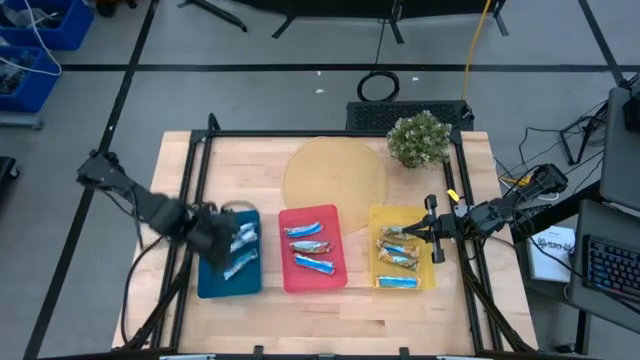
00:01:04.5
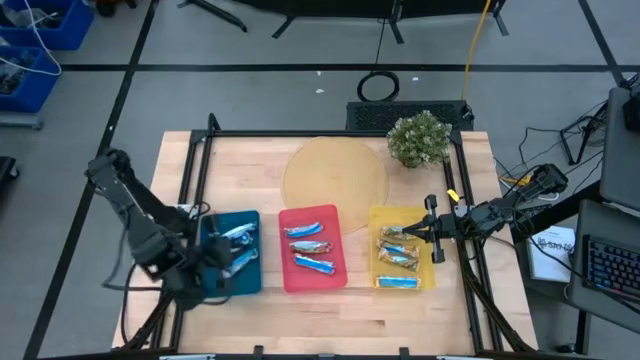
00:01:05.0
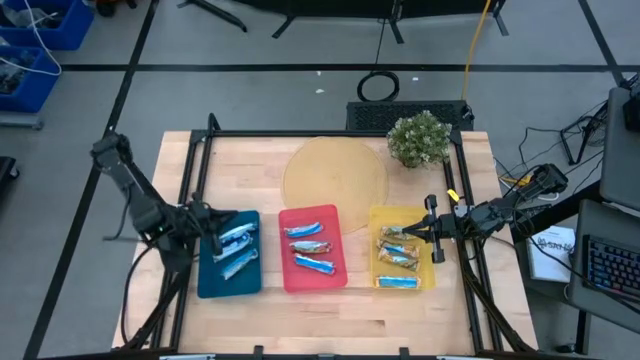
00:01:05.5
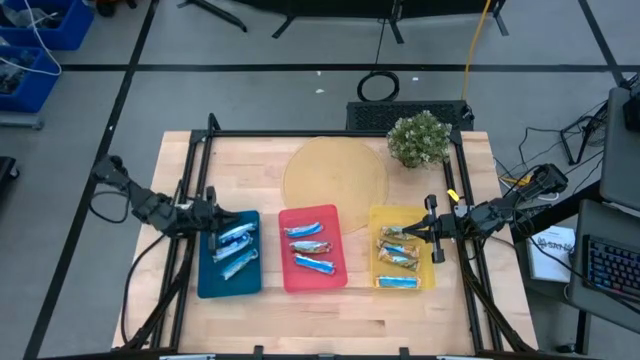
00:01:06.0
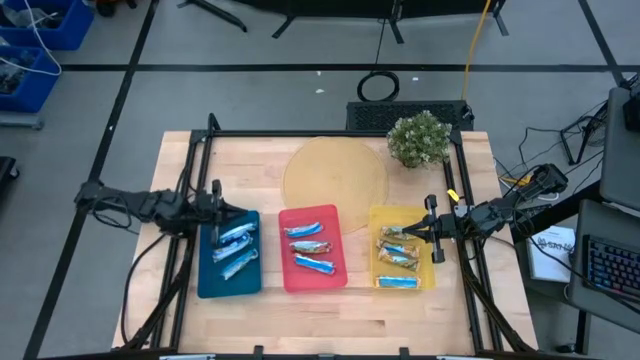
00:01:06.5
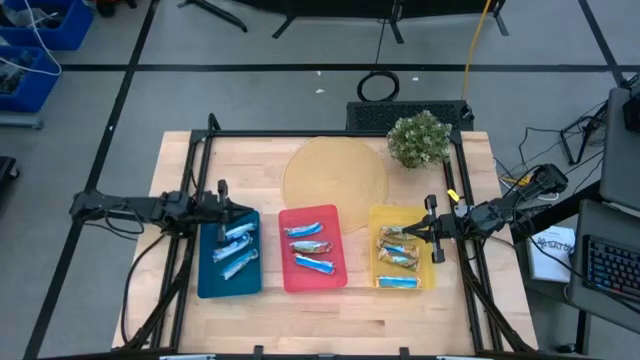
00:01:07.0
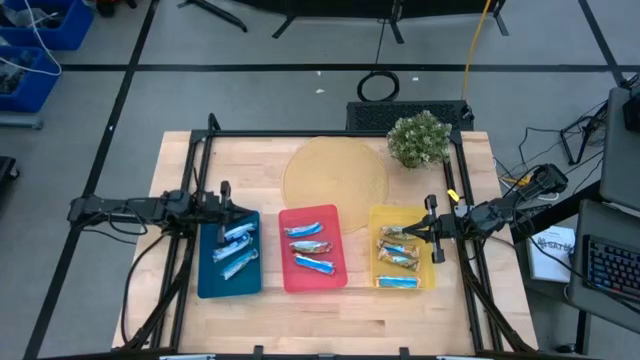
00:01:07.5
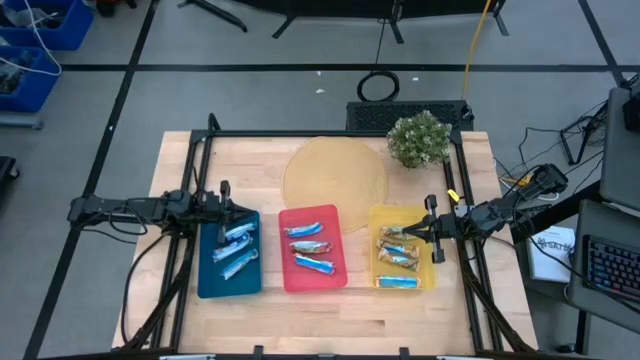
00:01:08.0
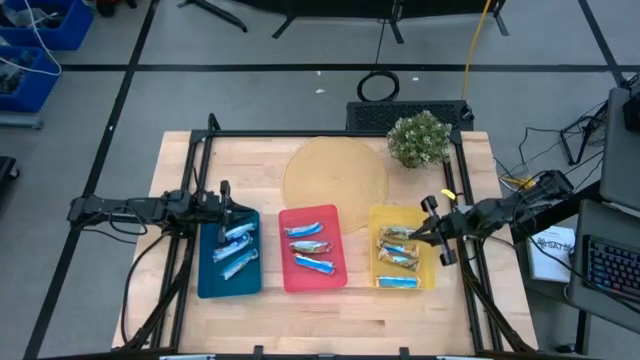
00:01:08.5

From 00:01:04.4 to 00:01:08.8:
Task: Pick and place Granola Bars by type
Return to Home Position

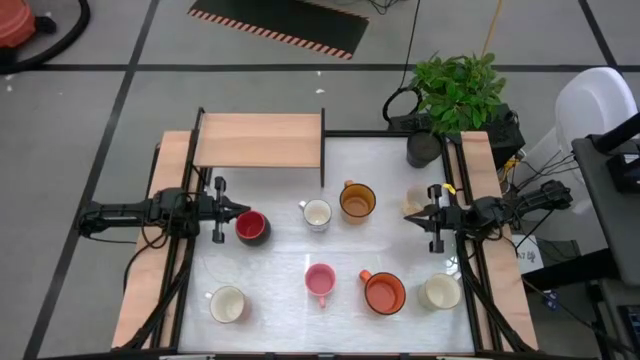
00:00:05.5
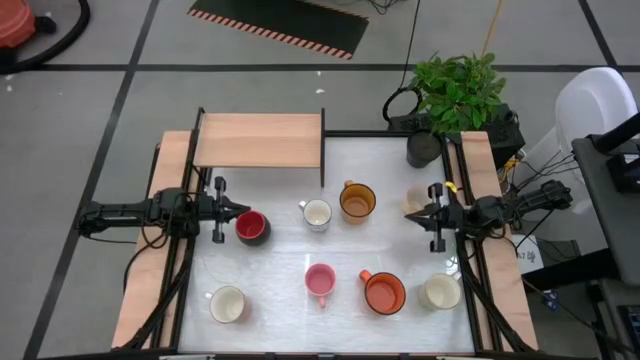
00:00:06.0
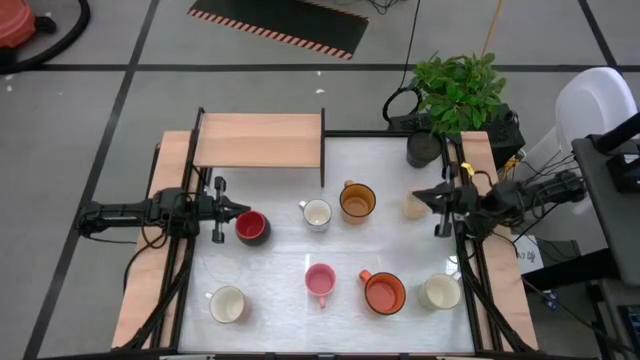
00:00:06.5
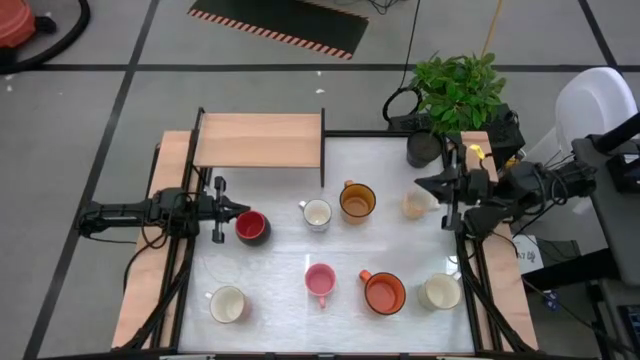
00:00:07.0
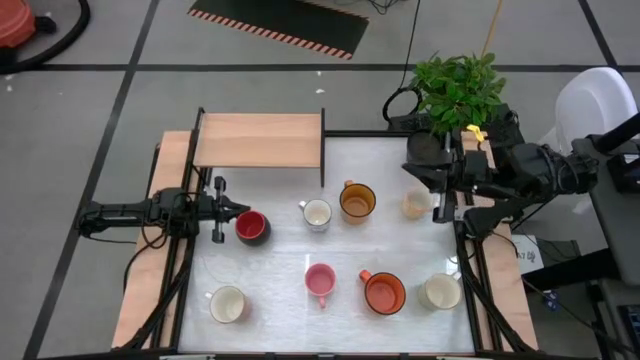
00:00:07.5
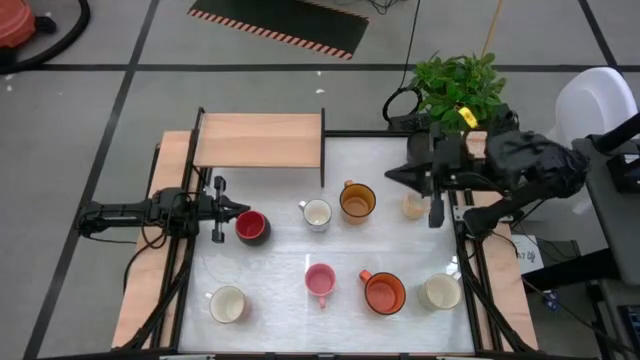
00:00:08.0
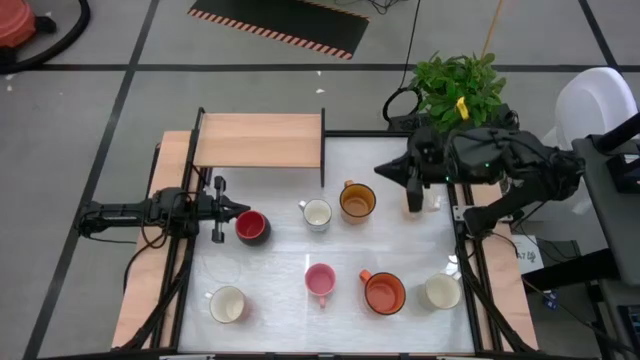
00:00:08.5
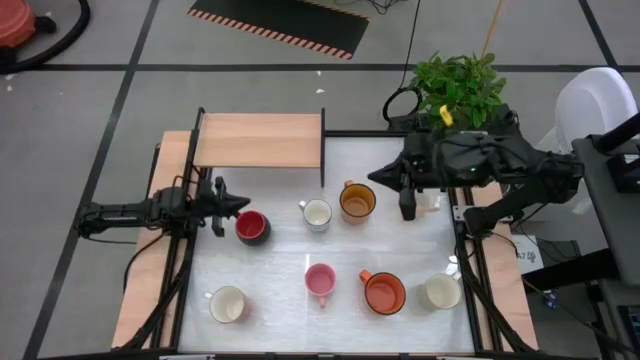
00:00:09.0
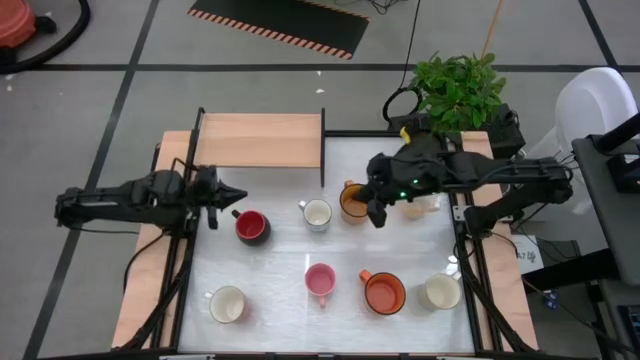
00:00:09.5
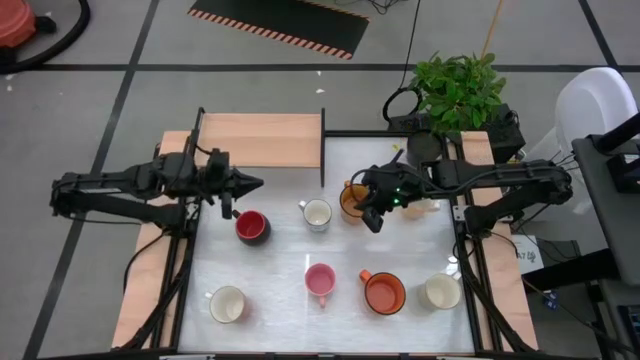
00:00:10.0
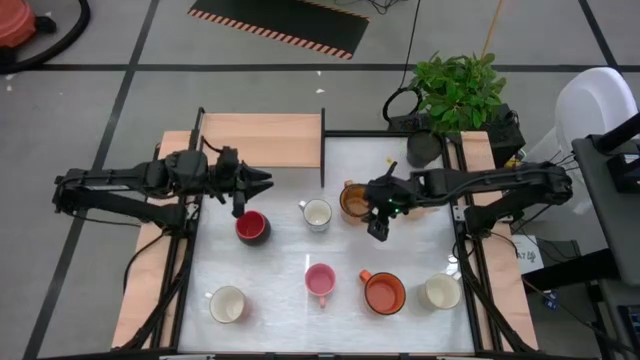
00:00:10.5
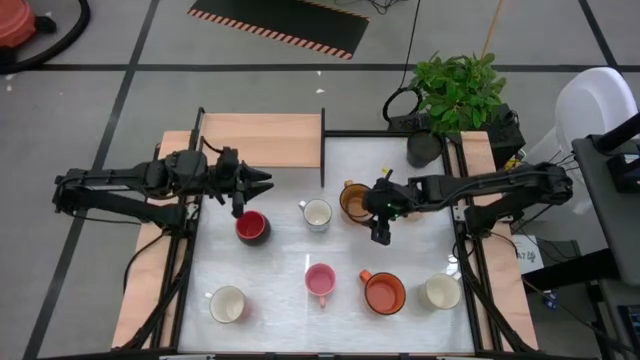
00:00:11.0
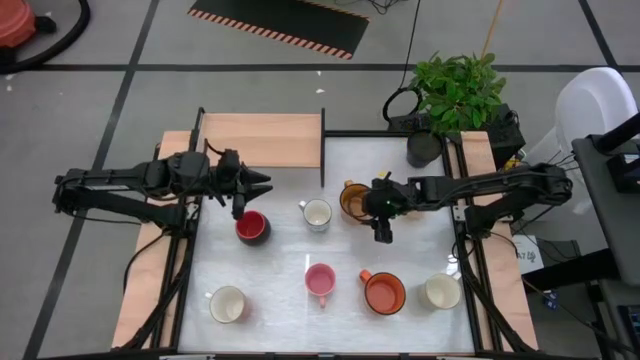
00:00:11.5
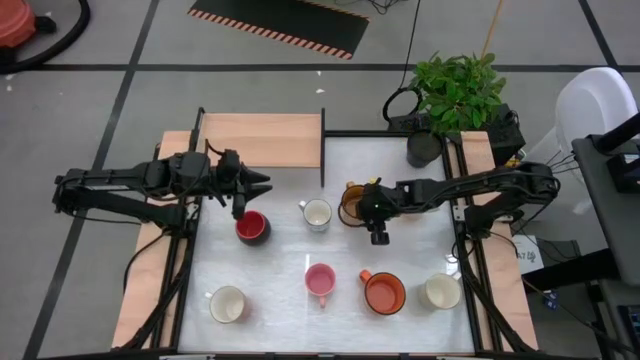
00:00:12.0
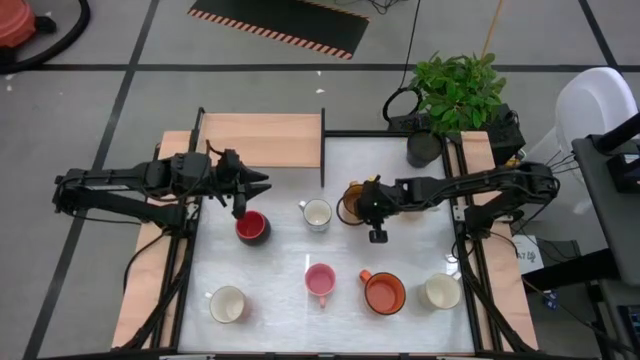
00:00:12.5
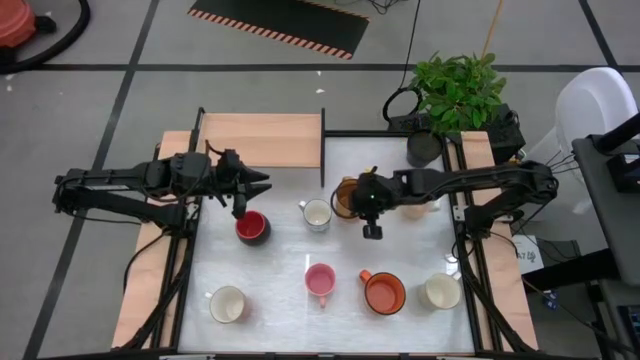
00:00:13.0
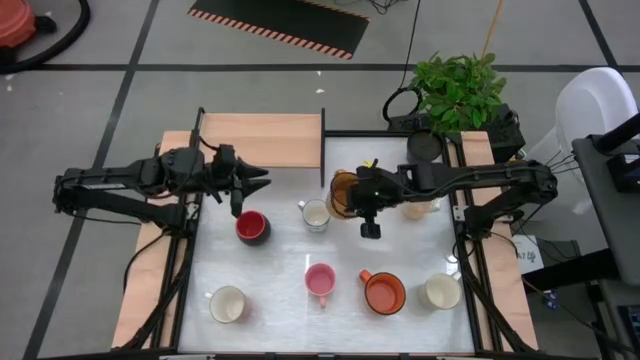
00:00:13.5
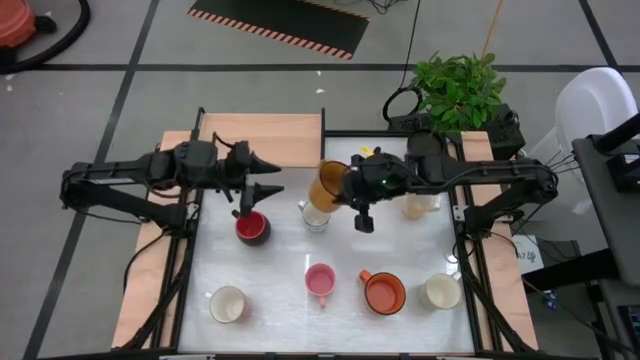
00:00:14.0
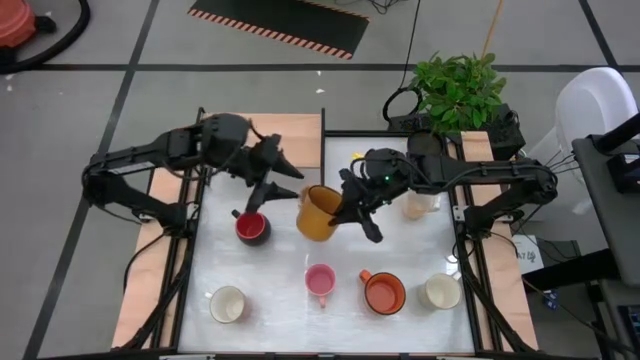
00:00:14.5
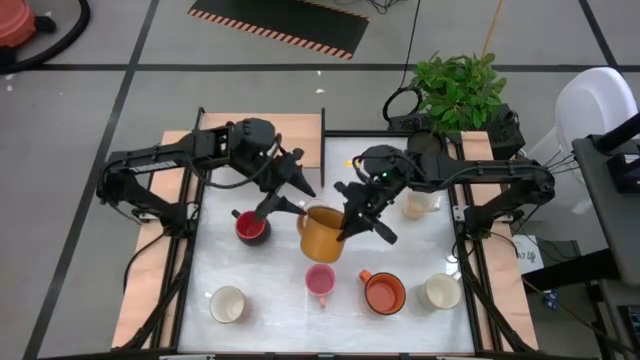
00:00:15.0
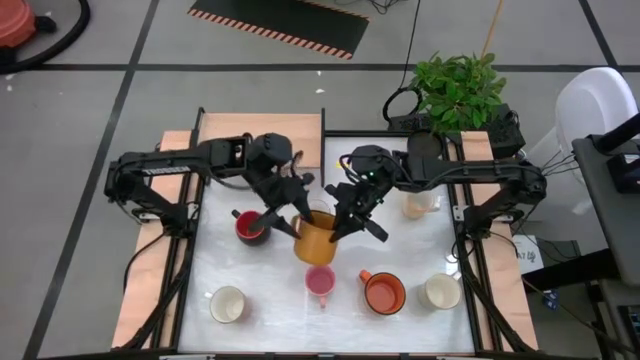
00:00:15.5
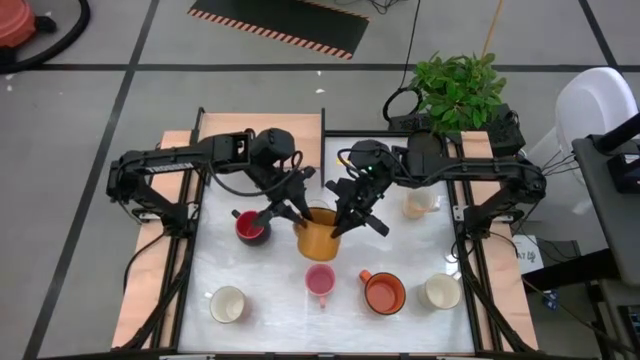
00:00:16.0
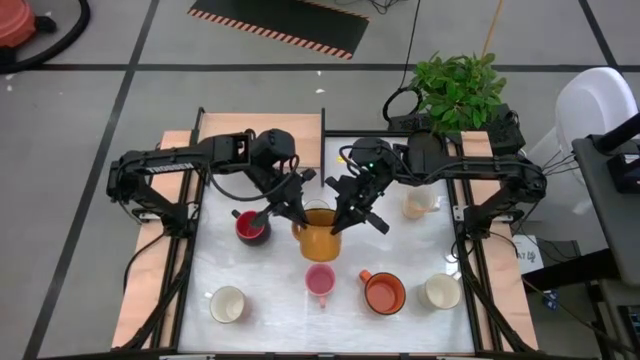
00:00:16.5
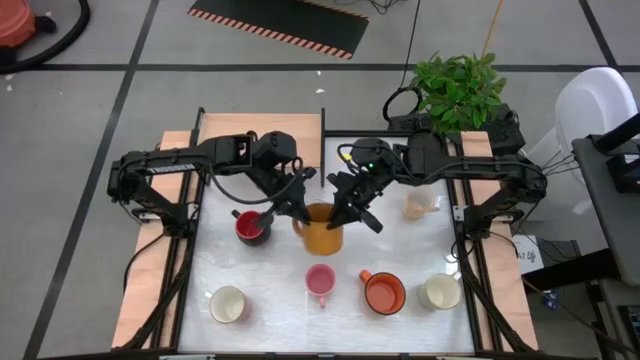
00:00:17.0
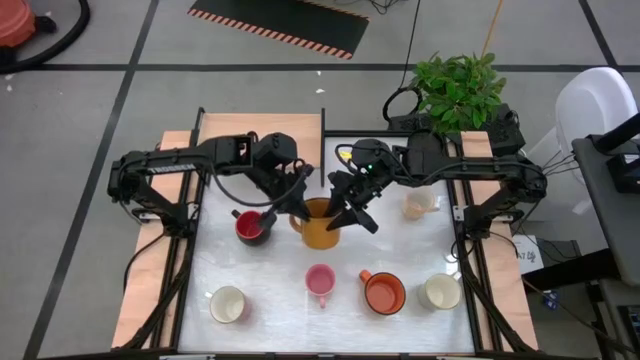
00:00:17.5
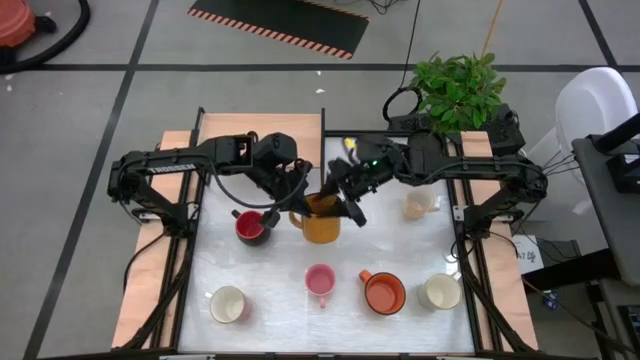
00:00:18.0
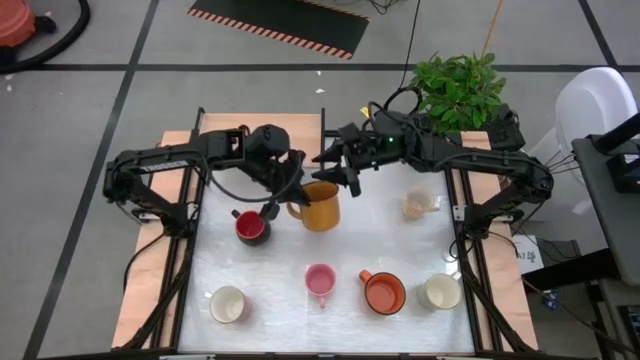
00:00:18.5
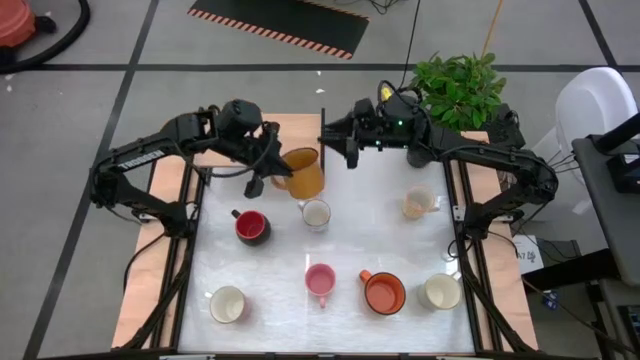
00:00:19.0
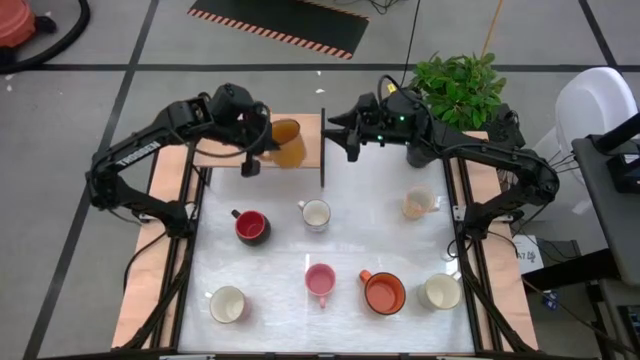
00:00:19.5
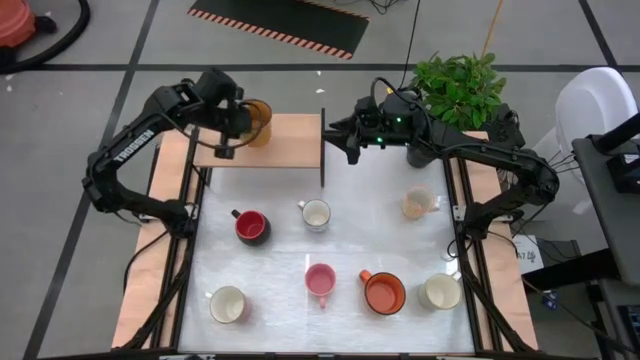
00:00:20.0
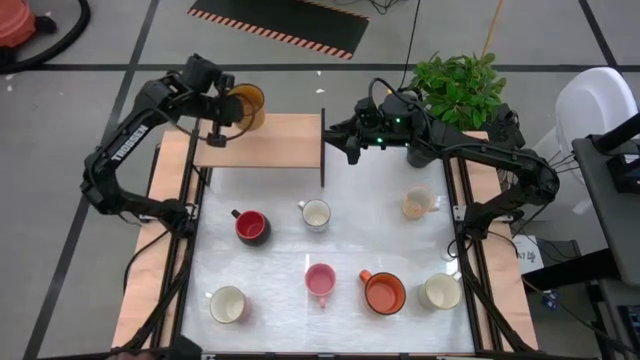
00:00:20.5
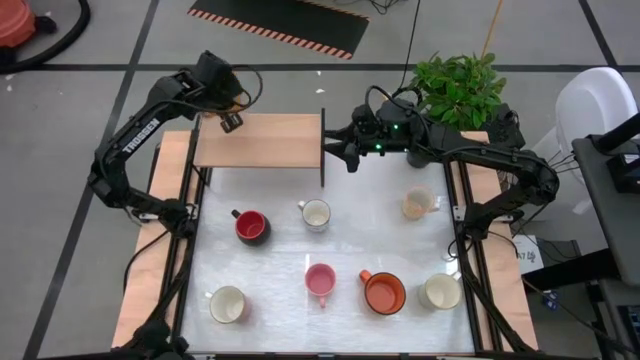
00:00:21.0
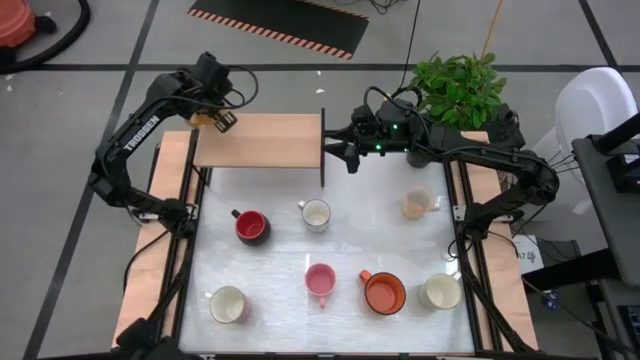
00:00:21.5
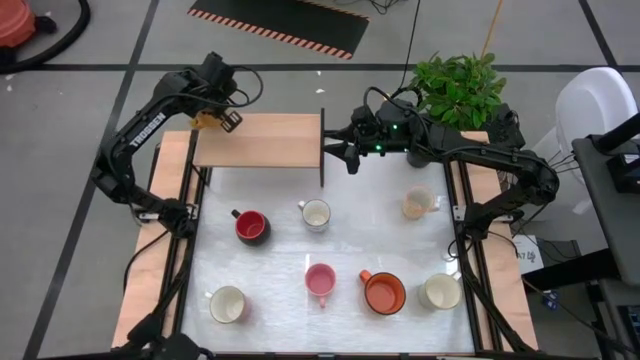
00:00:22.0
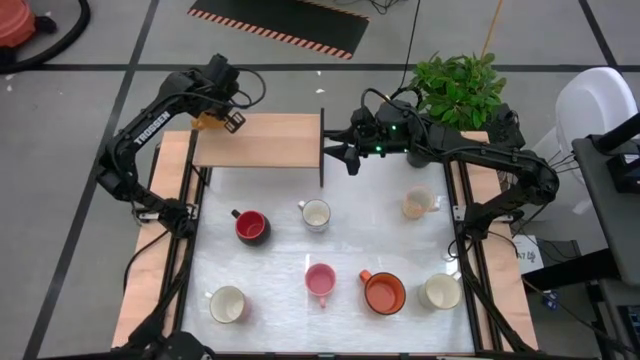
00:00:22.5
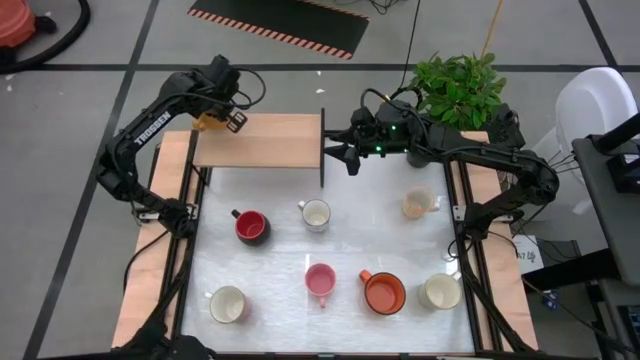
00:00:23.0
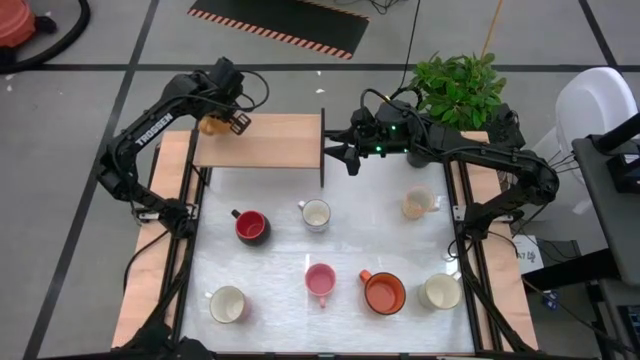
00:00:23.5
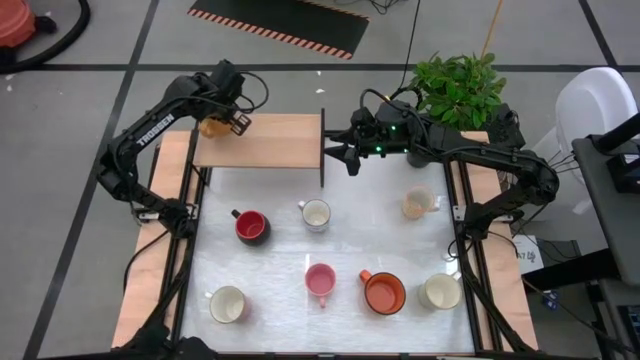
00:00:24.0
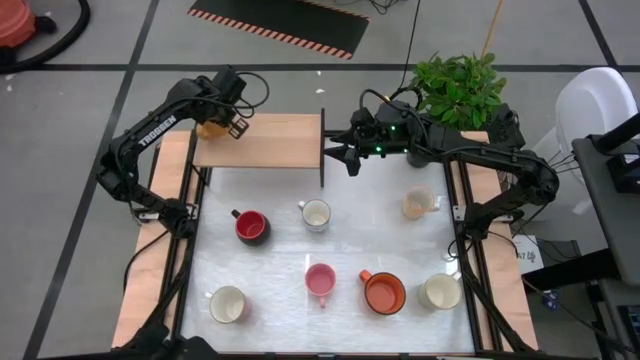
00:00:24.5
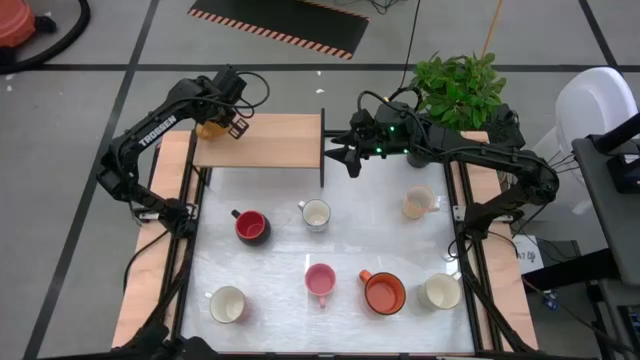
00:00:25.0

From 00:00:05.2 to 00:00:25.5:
Task: Place coffee mugs
Put the yellow mug on the shelf
